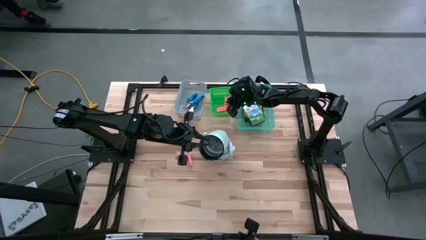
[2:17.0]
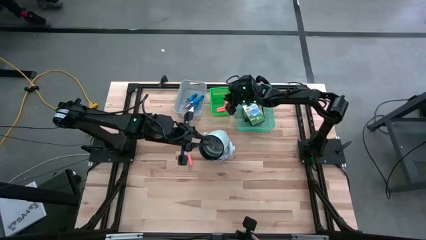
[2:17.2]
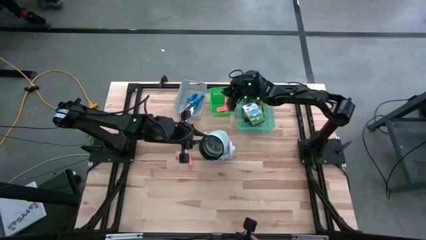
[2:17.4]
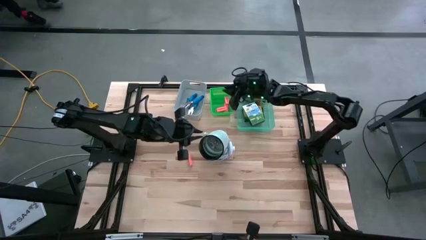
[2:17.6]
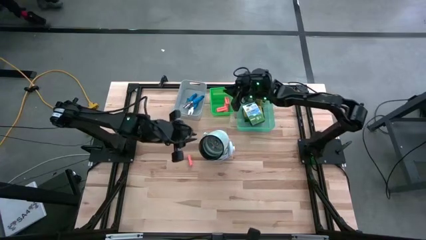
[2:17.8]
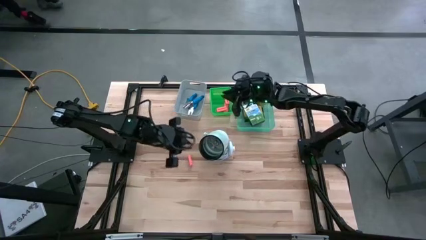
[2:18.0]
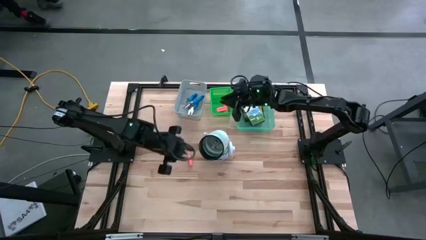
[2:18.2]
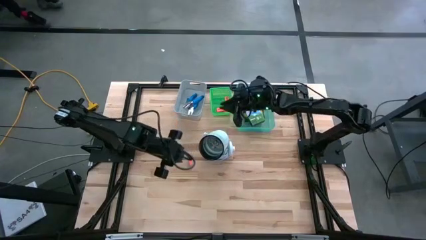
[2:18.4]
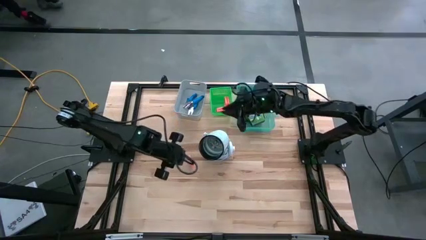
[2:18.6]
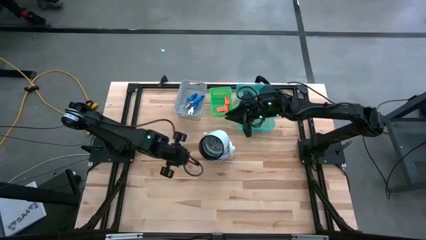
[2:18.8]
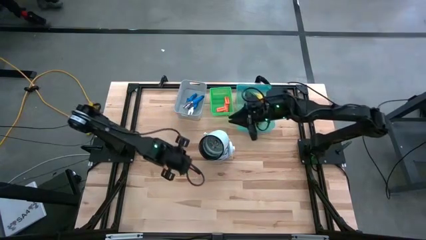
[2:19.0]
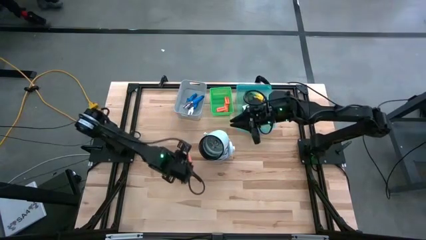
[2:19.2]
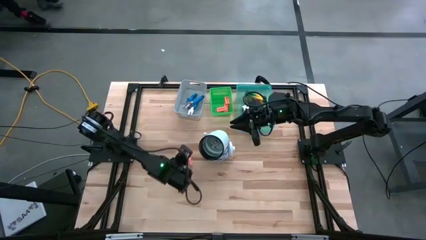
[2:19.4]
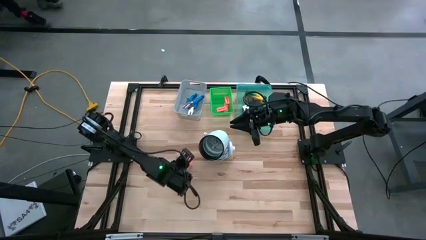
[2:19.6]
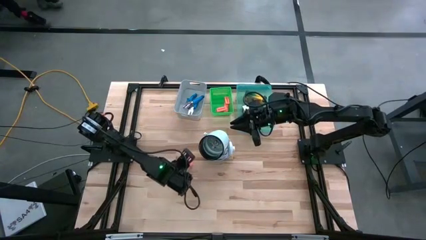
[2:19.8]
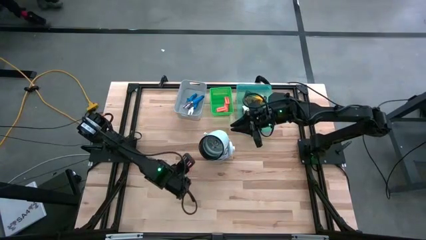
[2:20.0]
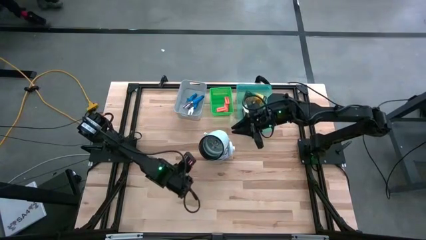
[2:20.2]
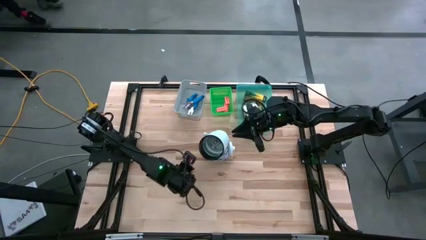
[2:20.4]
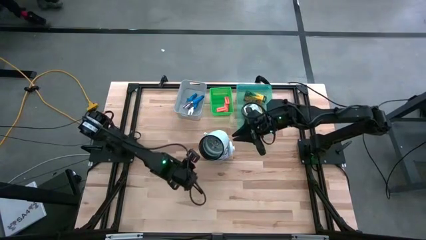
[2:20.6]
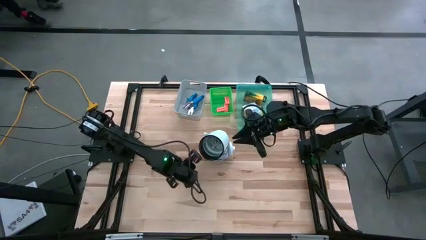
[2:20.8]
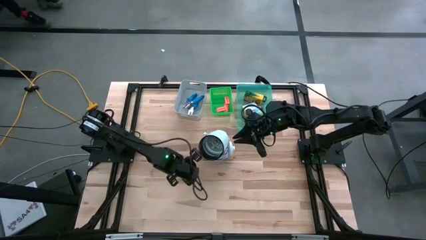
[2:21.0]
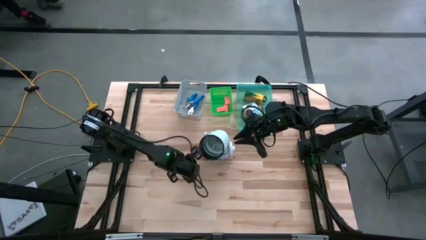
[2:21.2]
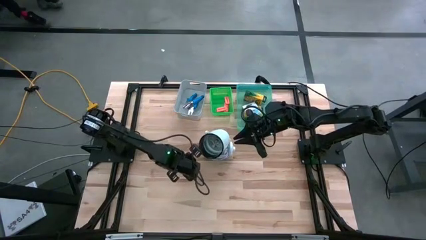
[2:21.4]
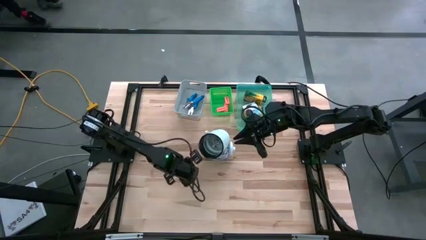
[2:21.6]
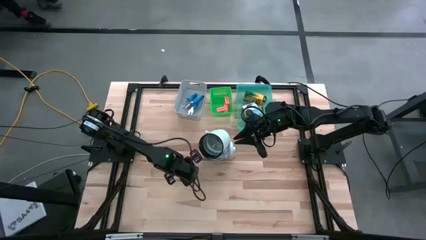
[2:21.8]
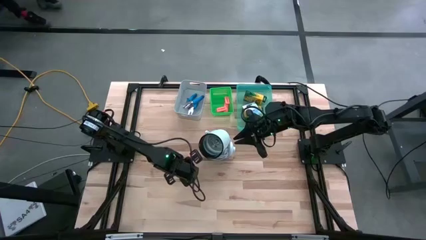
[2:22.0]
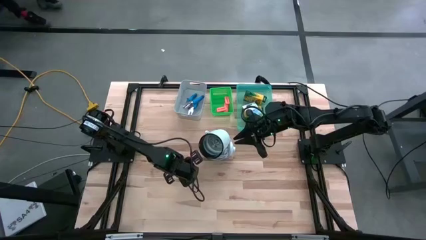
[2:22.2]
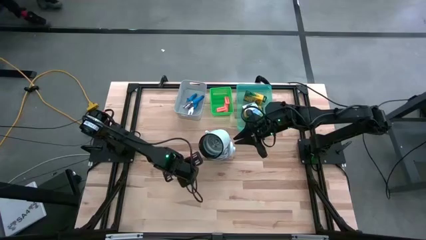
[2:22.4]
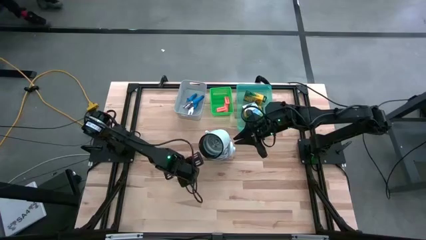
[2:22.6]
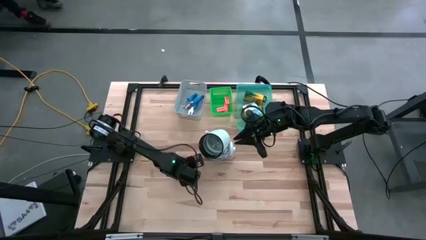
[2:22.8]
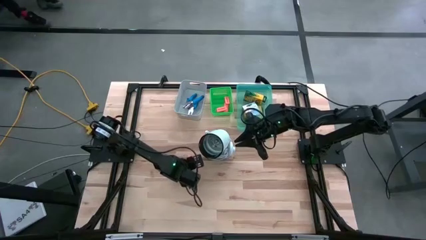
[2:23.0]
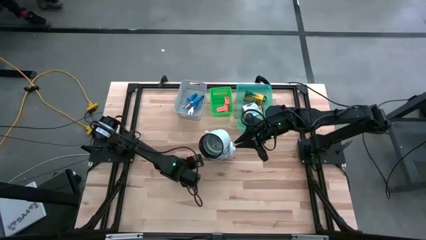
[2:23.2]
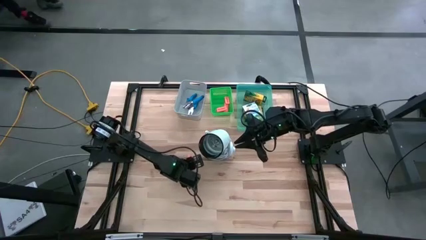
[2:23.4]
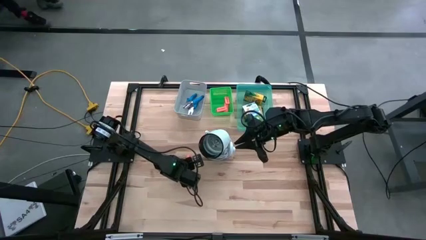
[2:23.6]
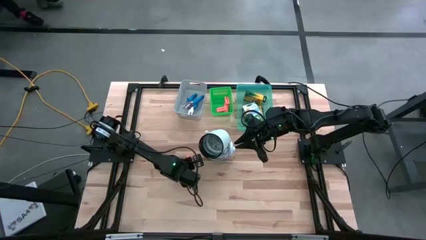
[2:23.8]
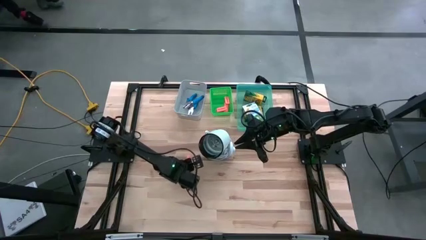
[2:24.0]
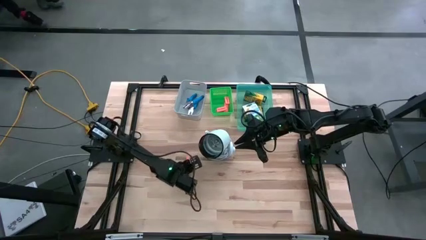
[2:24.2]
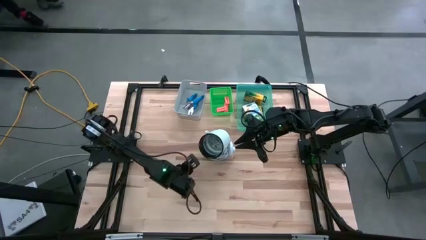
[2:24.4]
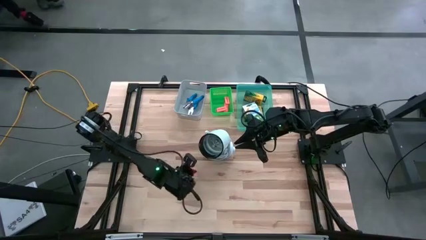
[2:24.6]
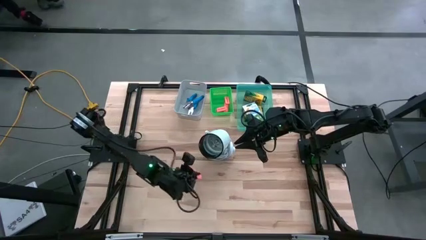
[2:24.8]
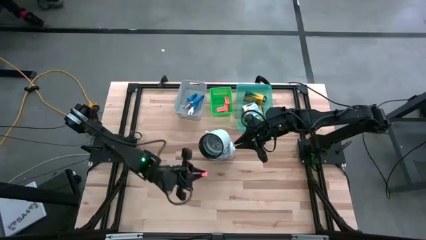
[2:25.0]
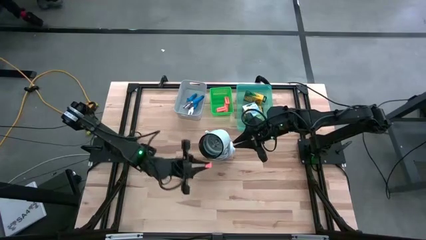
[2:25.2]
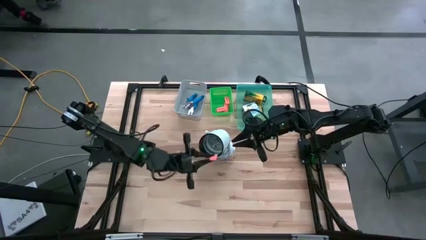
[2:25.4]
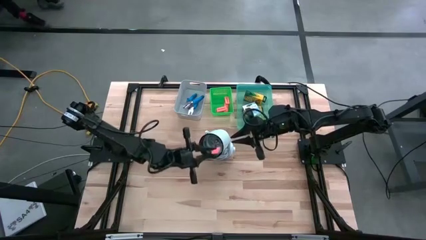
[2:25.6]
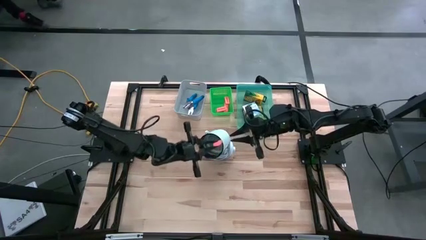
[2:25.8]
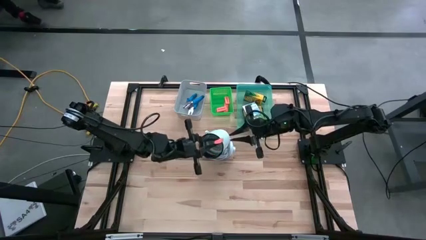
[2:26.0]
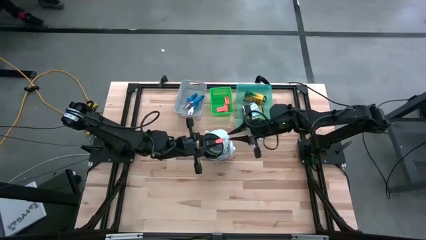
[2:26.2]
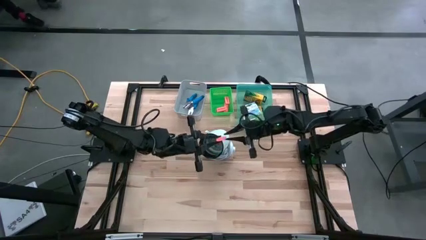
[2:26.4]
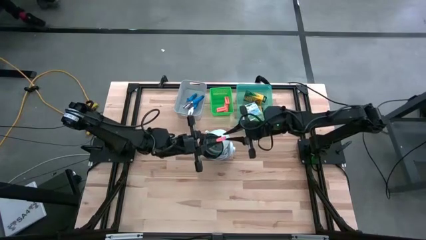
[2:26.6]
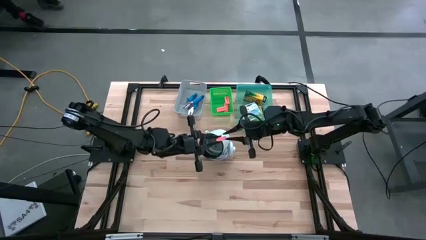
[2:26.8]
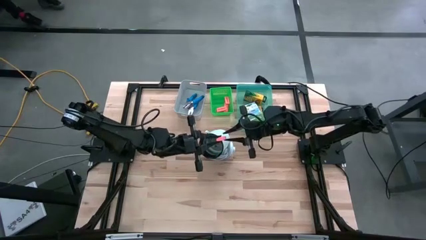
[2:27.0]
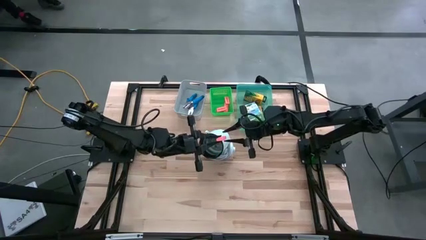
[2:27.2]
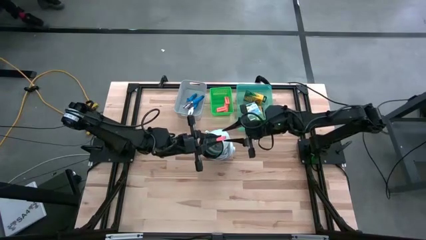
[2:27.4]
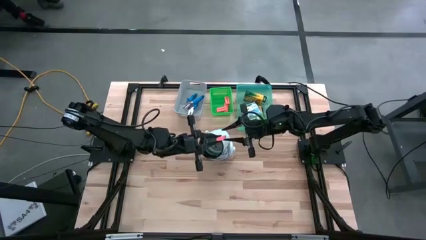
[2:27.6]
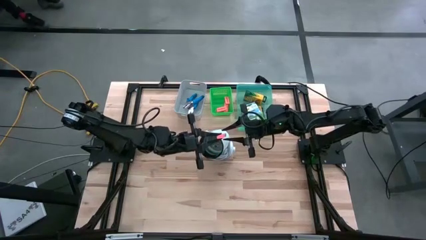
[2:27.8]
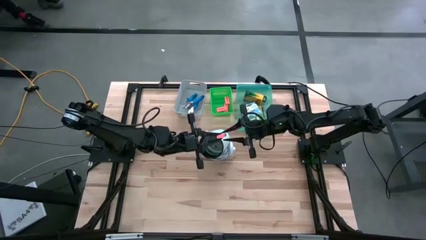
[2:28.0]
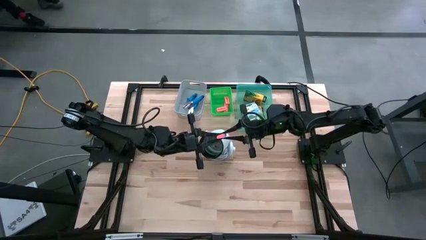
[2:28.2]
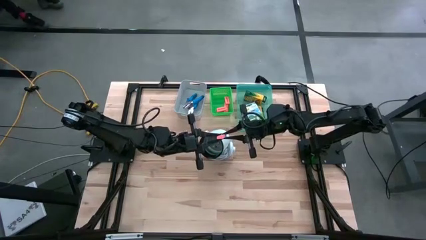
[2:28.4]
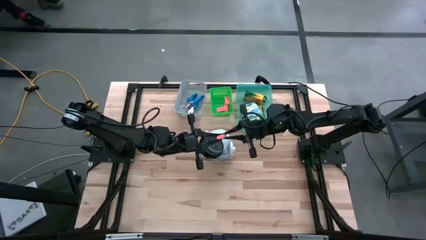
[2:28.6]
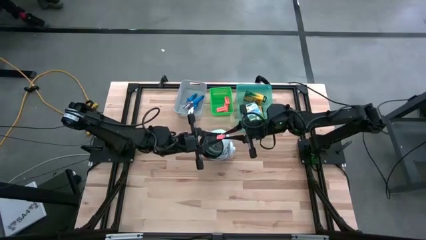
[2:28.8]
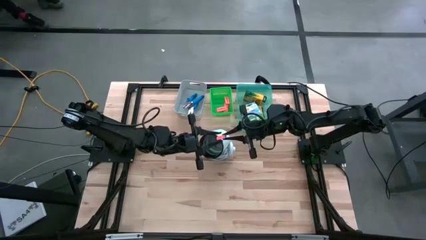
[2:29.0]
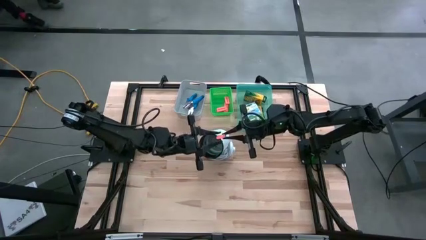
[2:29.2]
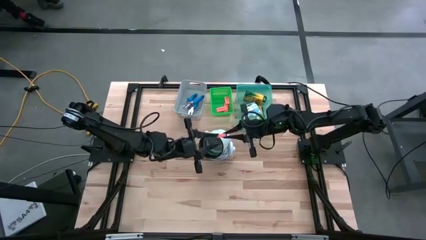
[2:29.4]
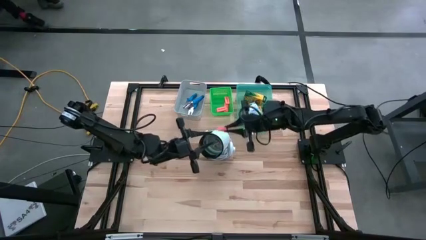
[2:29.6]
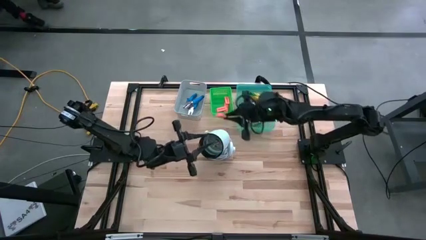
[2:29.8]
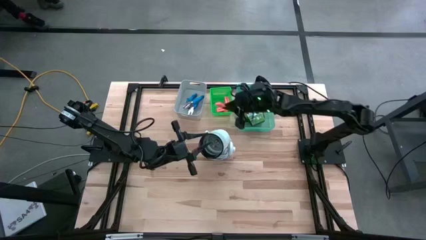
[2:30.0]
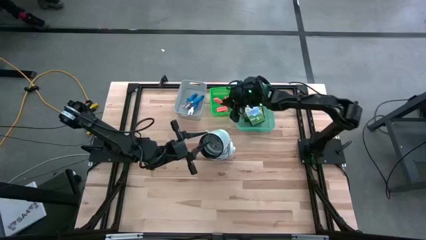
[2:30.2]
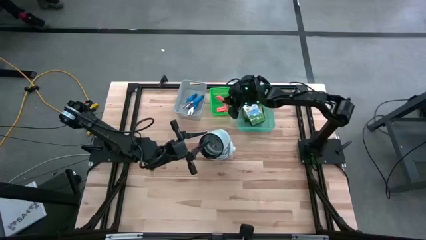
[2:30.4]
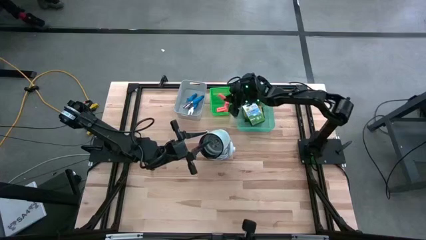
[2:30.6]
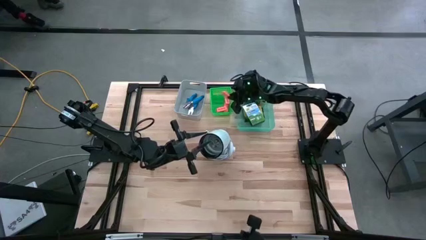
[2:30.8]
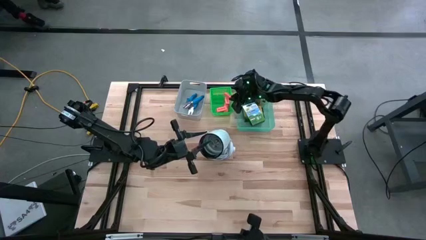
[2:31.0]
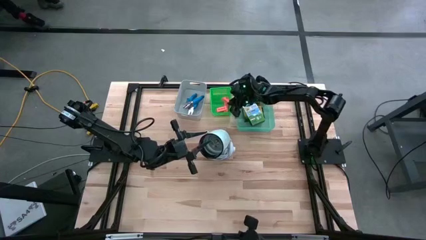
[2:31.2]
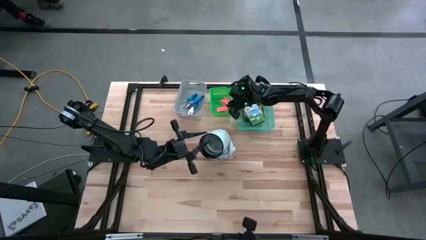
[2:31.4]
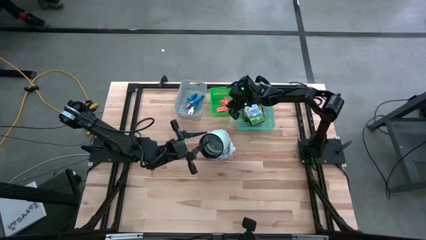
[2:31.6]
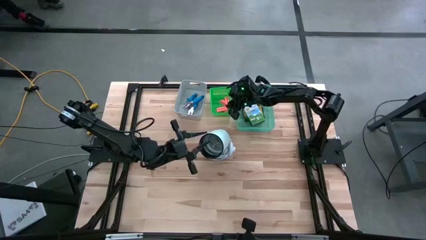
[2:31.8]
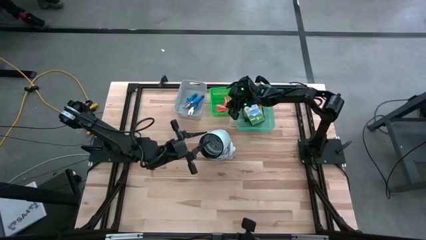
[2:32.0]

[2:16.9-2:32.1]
Task: Pick & Place School Supplies
Put the orange eraser into the green bin

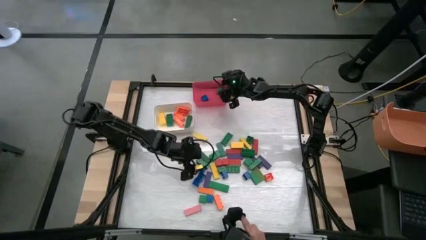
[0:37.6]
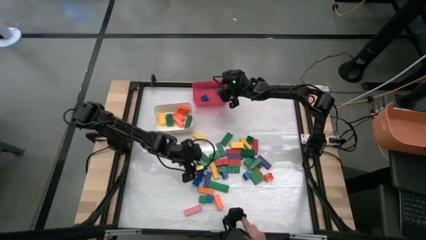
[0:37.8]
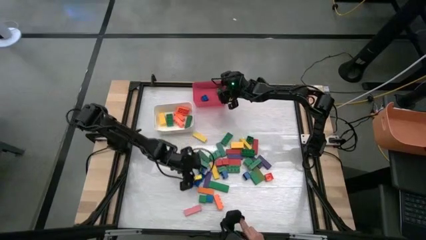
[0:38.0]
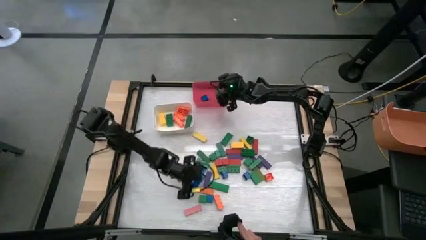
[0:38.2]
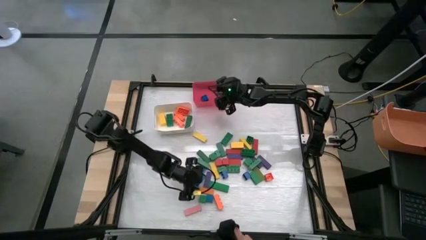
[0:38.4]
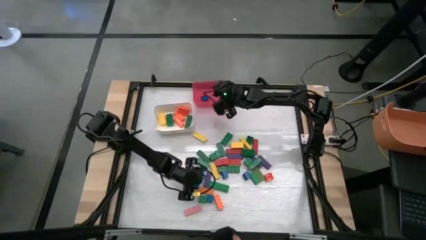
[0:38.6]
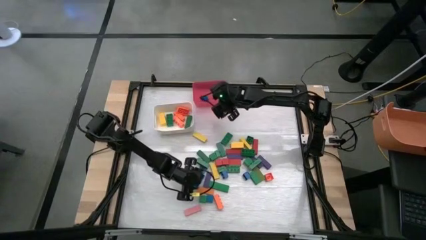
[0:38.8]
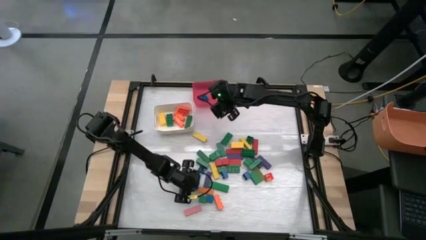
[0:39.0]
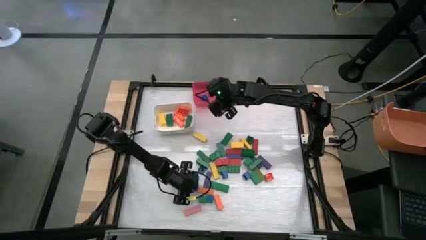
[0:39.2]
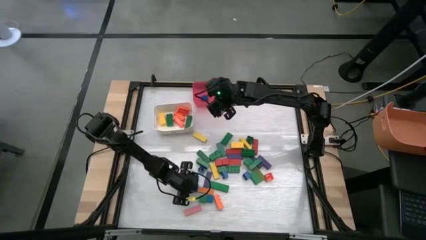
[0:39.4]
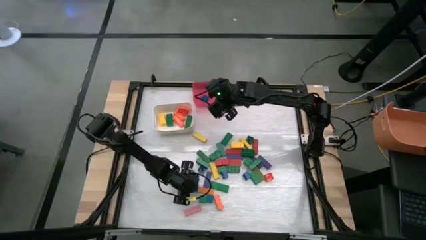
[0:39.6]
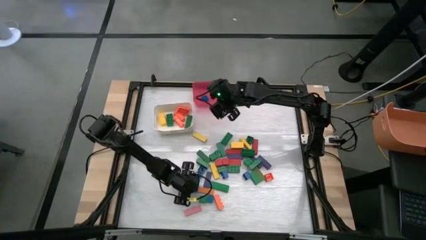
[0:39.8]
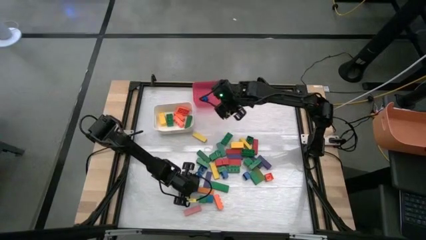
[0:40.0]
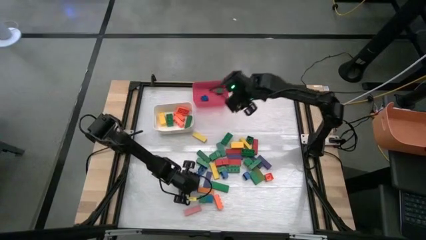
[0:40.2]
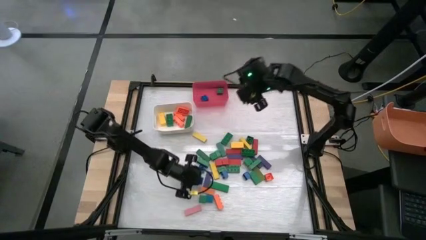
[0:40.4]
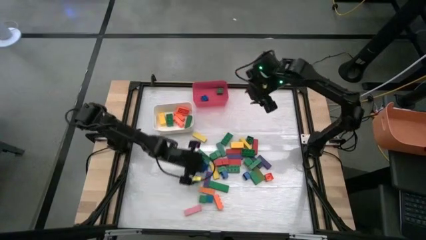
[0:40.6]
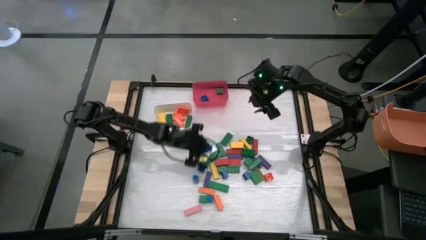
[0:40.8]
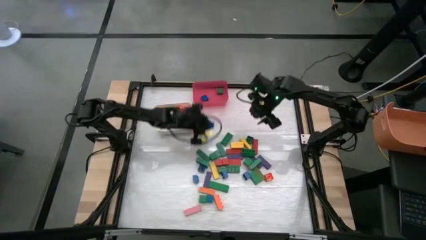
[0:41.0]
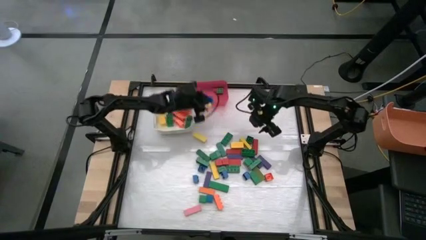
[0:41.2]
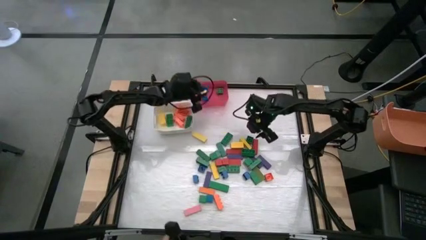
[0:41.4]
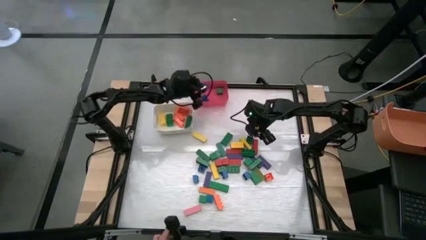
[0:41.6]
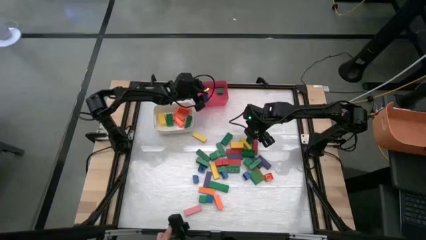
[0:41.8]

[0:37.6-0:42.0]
Task: Sort blocks by size
Put the small blue game piece into the red bin
